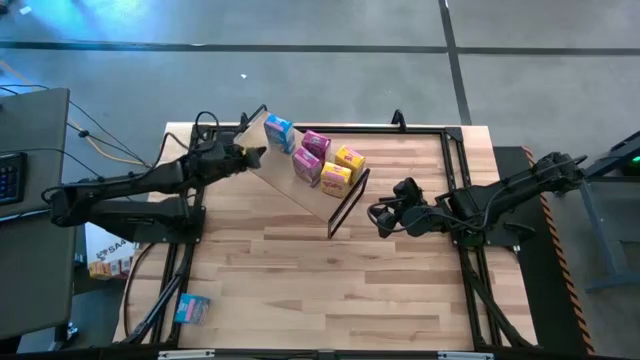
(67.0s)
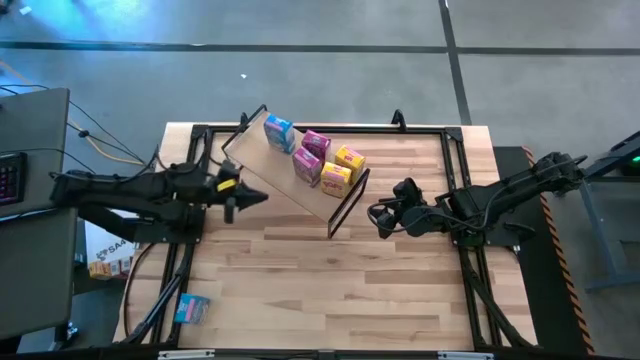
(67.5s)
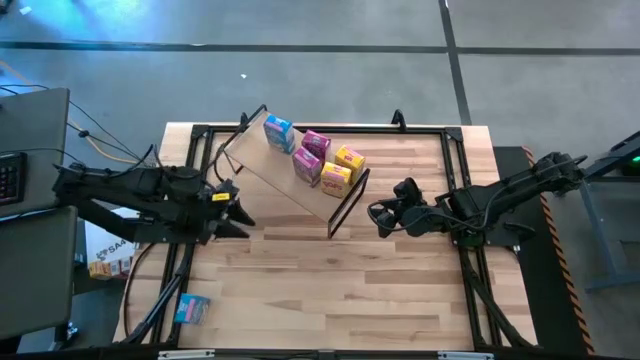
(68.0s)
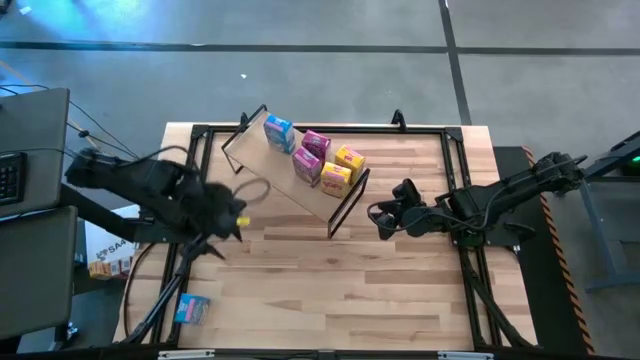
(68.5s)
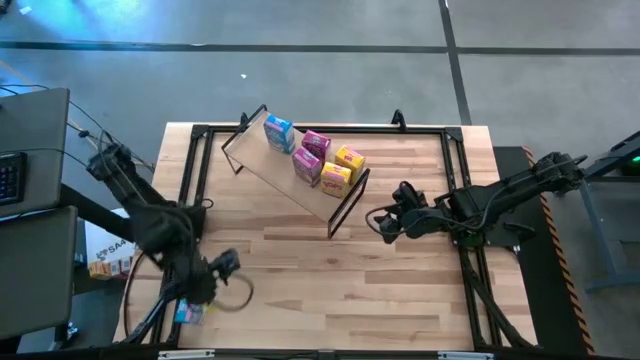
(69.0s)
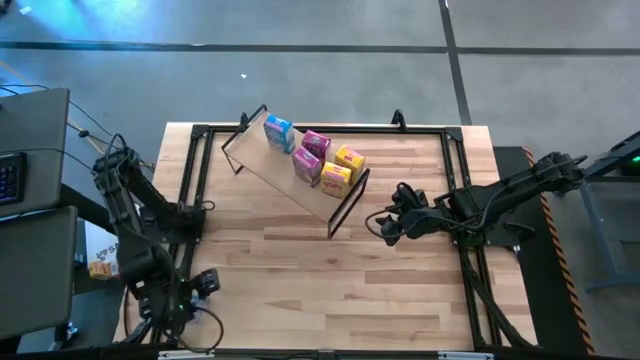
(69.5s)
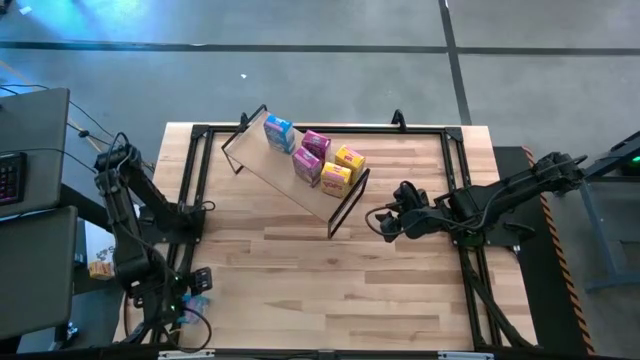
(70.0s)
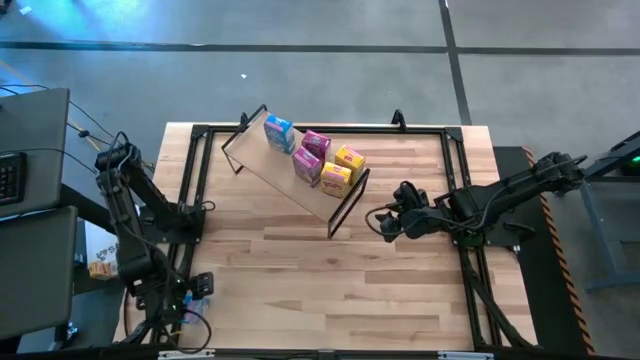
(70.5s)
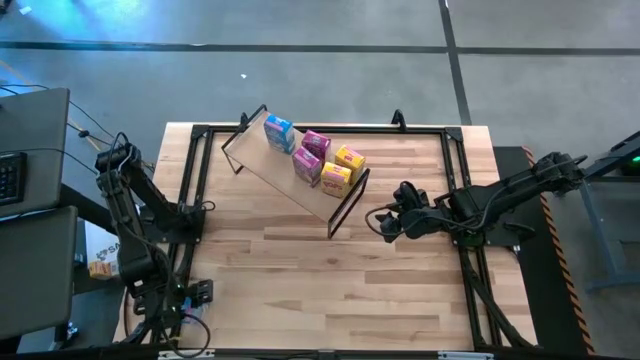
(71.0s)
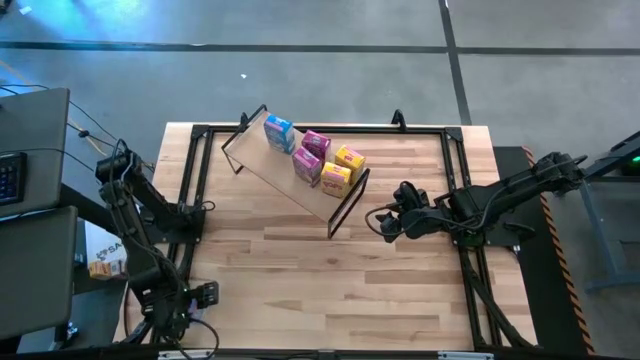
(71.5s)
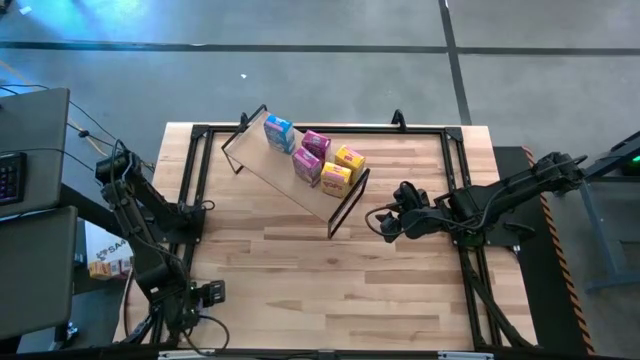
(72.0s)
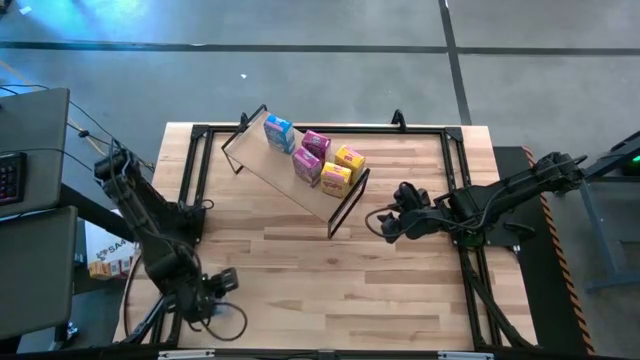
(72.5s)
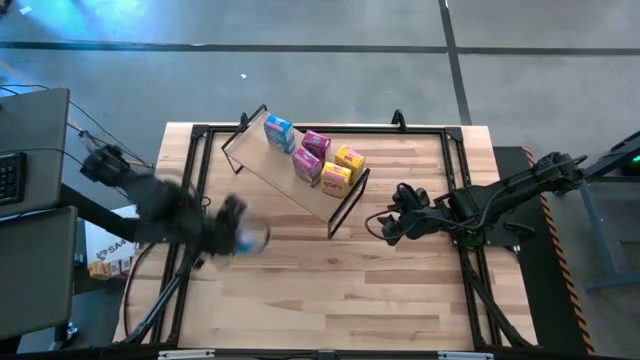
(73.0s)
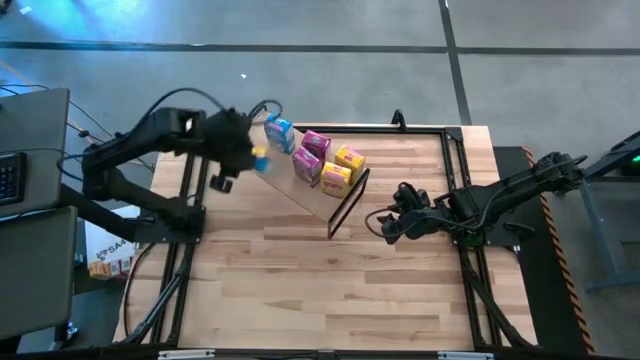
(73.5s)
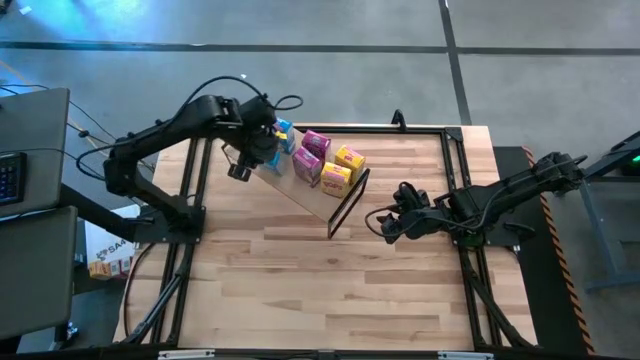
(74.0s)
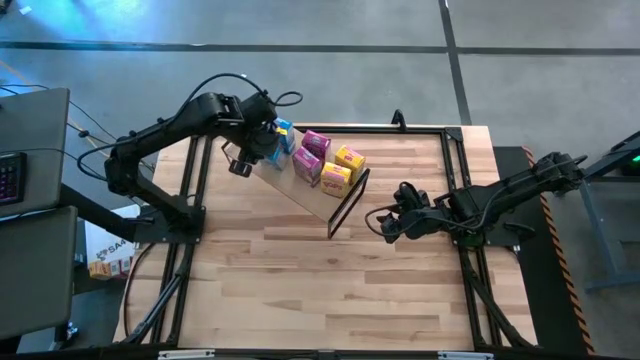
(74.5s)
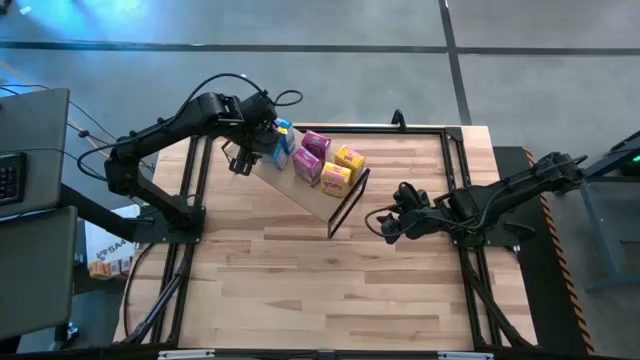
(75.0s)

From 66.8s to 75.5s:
Task: Stack cereal on shelf
Put the blue cereal box on the shelf aligned with the other blue cereal box

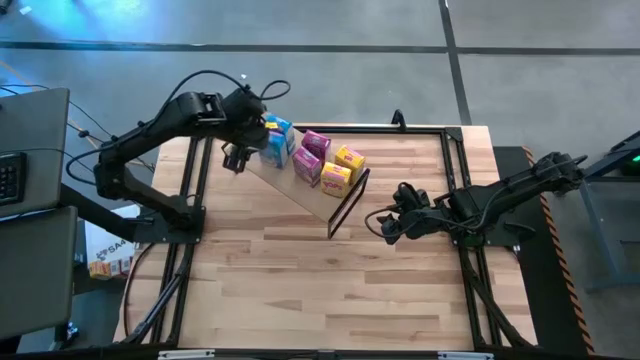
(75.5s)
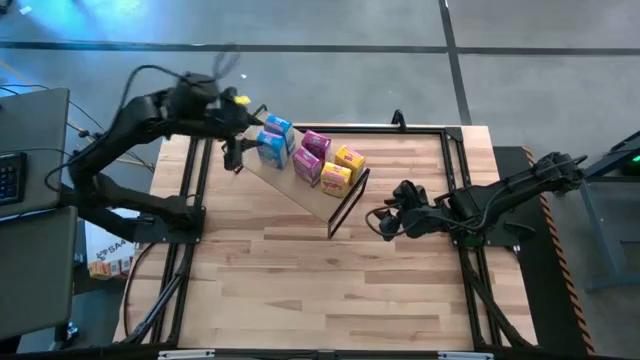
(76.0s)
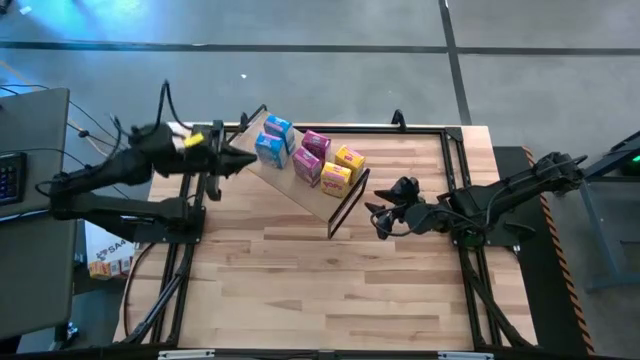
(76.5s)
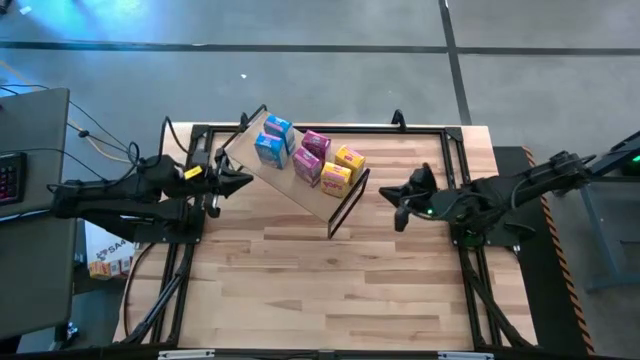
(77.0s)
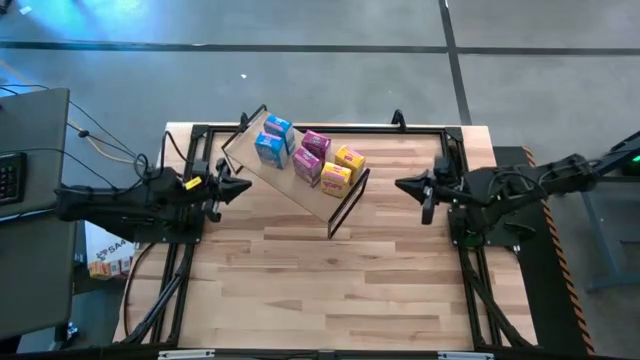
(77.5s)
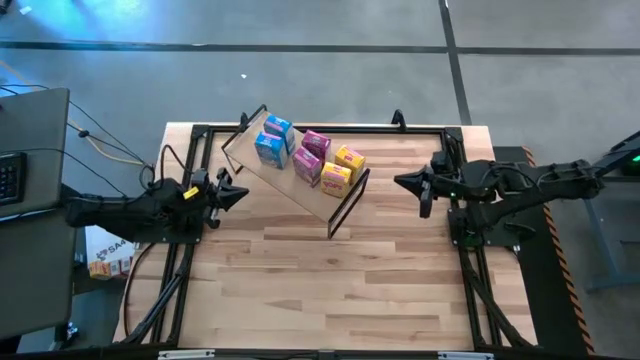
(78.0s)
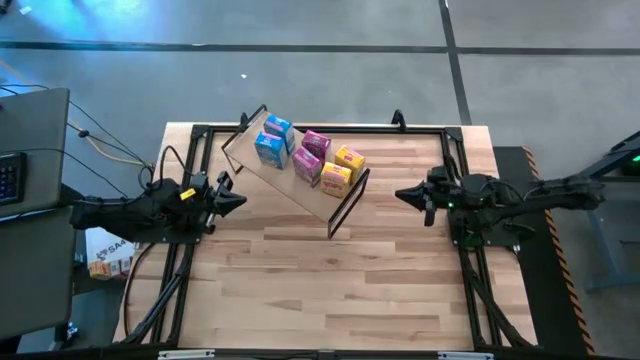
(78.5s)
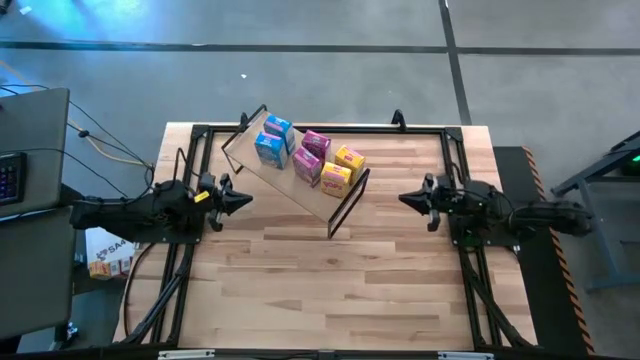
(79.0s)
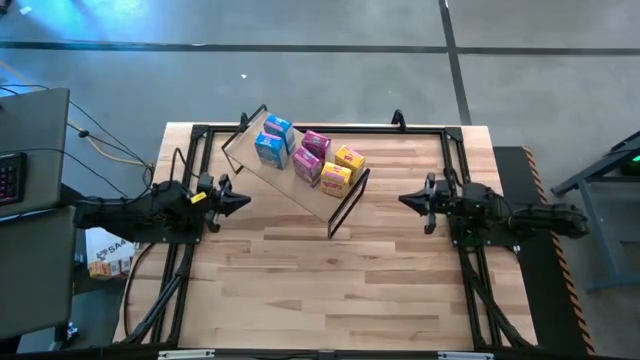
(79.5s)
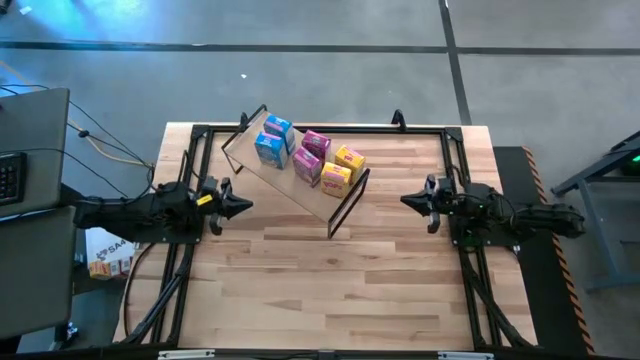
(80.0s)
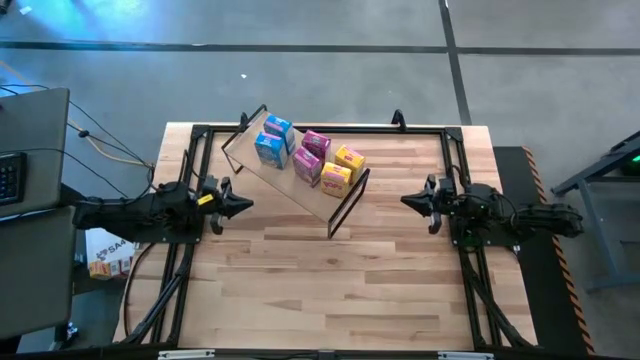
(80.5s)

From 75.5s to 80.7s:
Return to Home Position

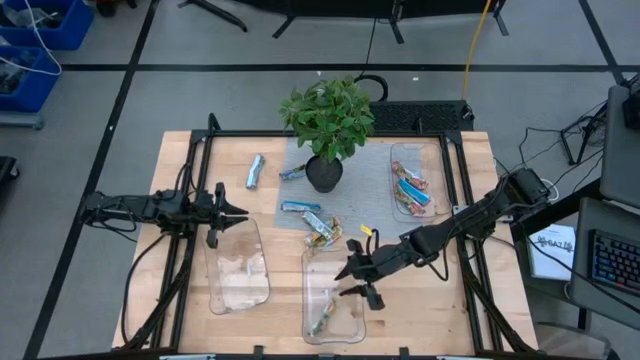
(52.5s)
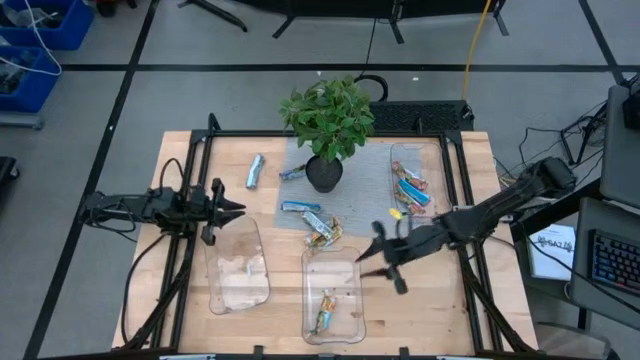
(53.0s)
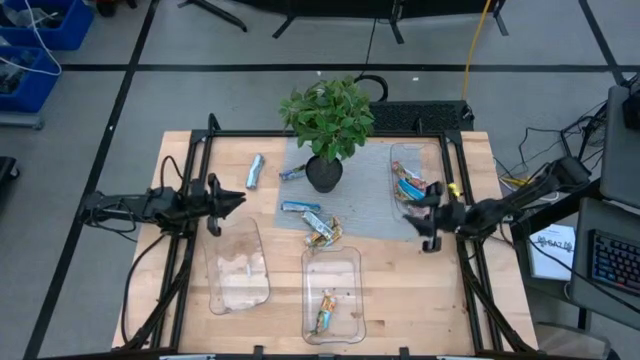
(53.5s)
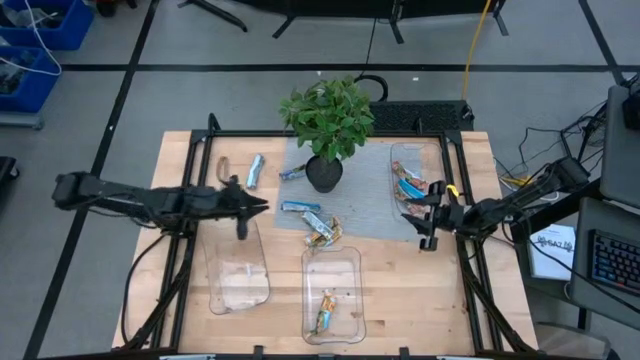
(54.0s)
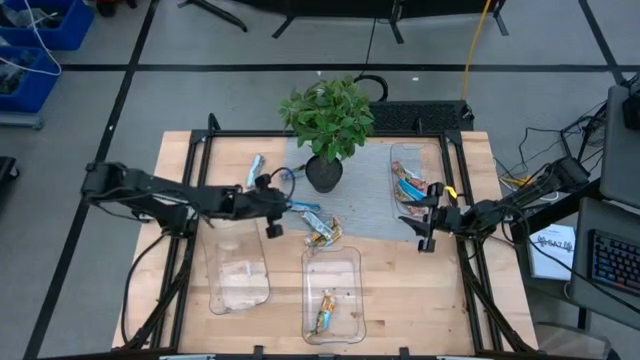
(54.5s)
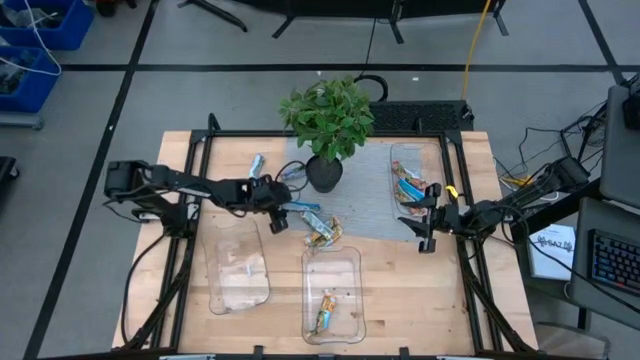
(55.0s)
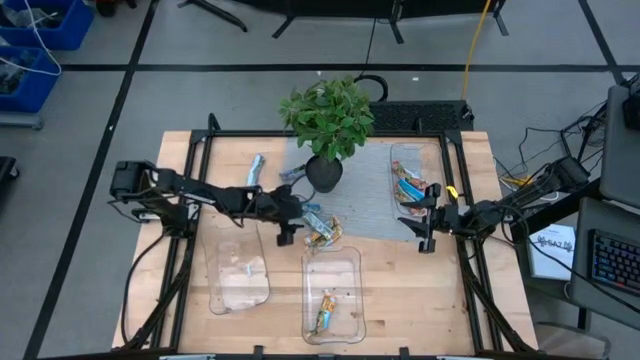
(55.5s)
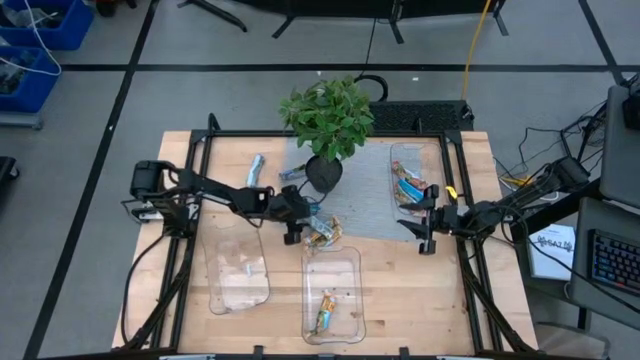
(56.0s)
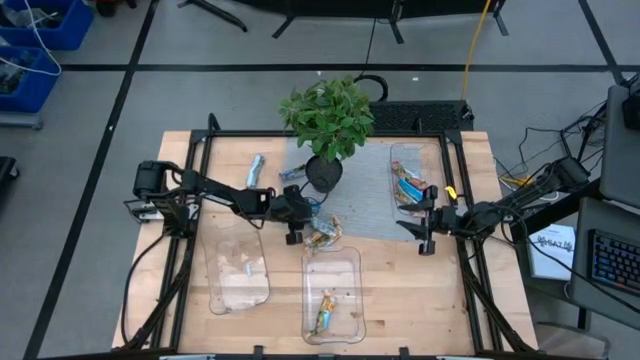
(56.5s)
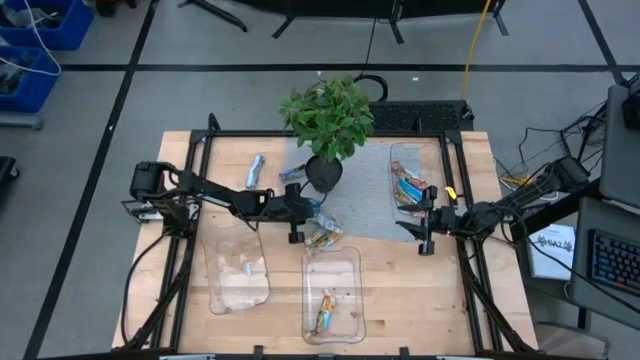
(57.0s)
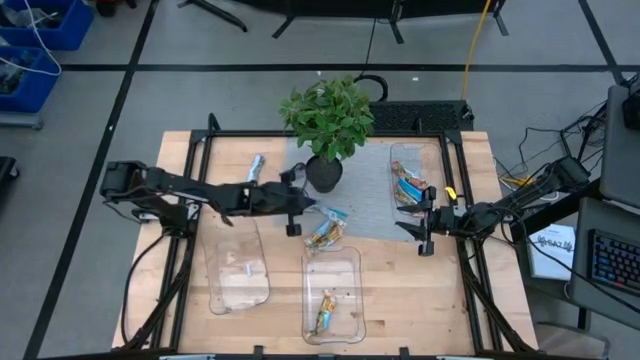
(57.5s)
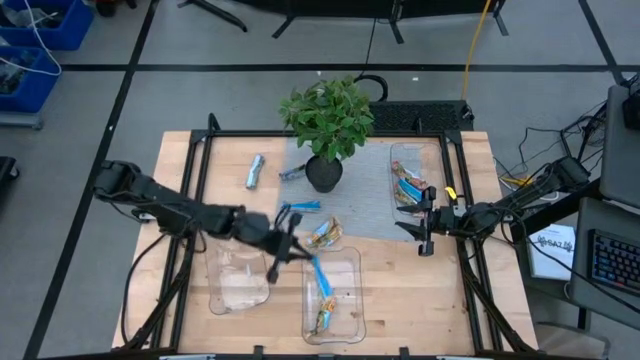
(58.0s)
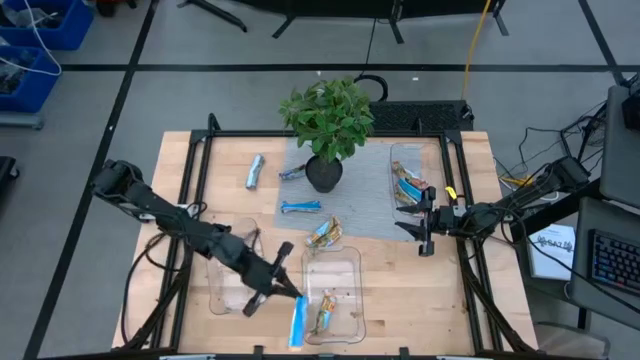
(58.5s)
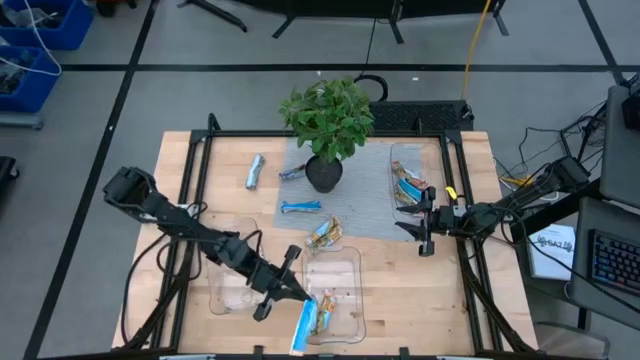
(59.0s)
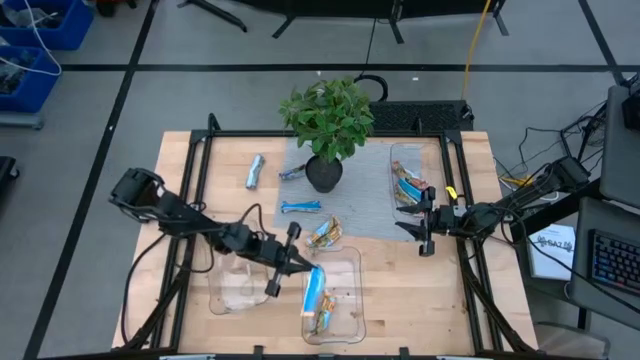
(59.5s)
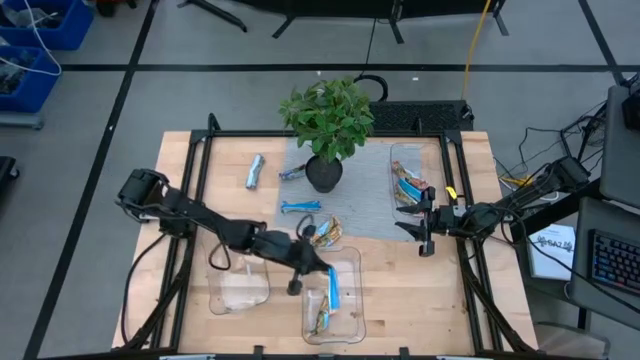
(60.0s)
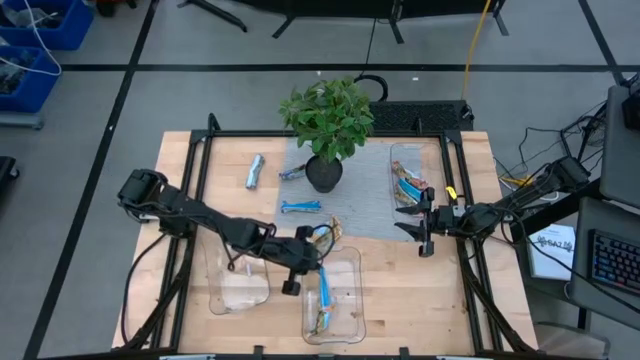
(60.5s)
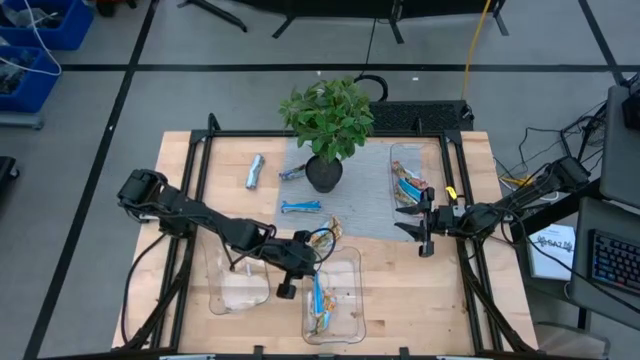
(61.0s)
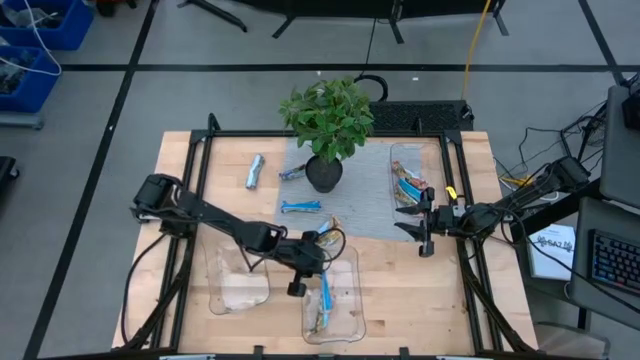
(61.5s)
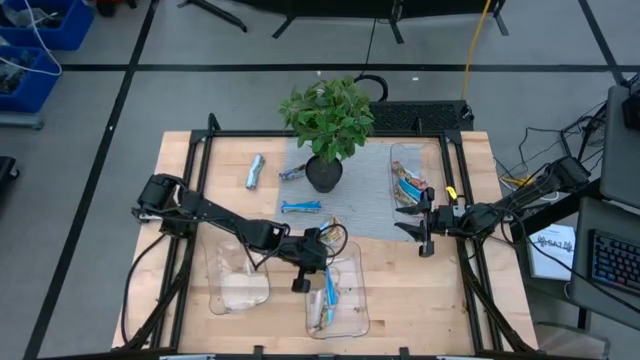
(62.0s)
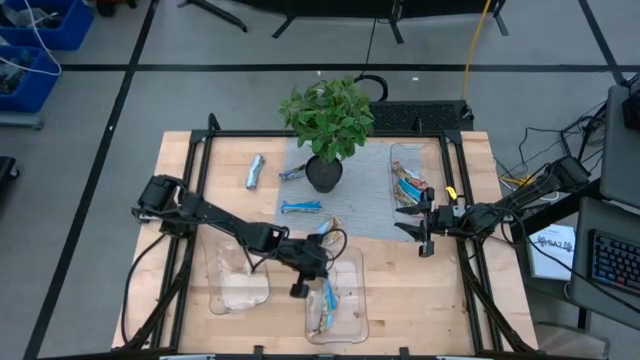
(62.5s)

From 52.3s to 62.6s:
Task: Pick and place Granola Bars by type
Put the top yellow granola bar into the middle transparent bin
